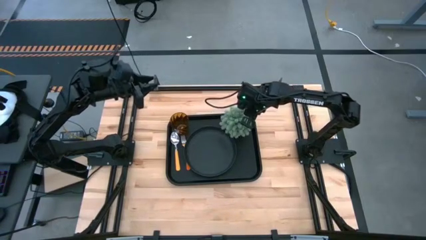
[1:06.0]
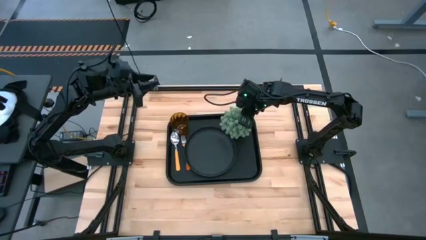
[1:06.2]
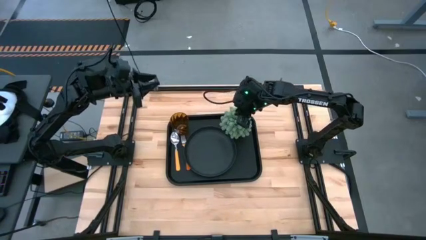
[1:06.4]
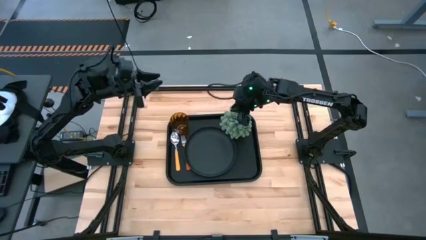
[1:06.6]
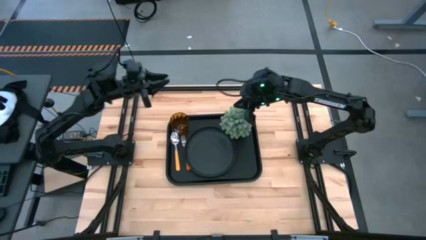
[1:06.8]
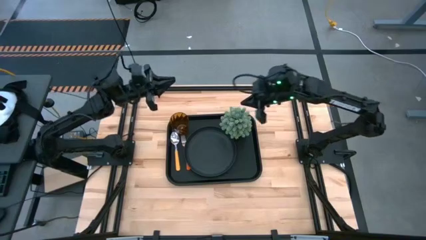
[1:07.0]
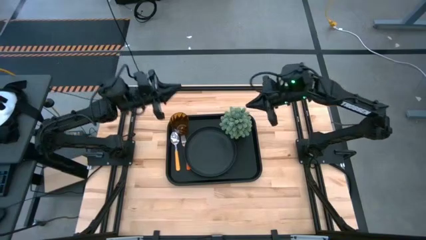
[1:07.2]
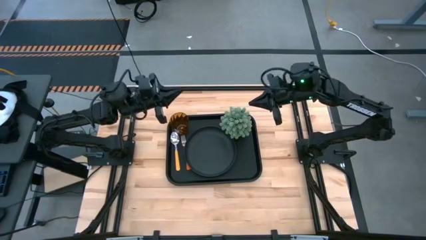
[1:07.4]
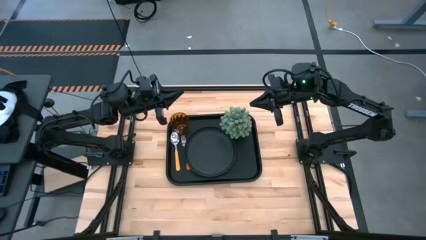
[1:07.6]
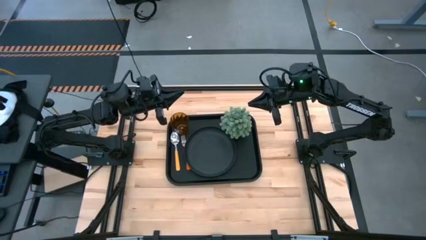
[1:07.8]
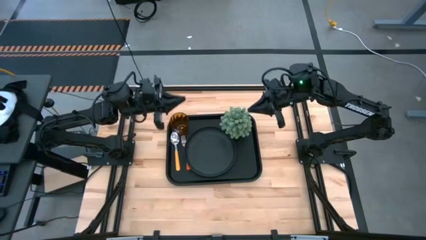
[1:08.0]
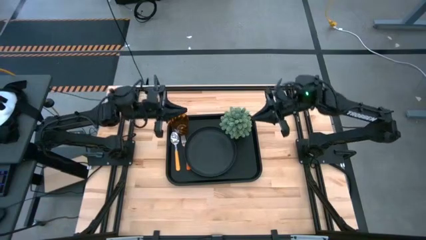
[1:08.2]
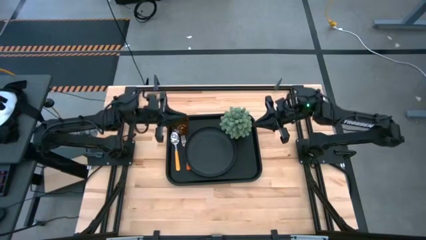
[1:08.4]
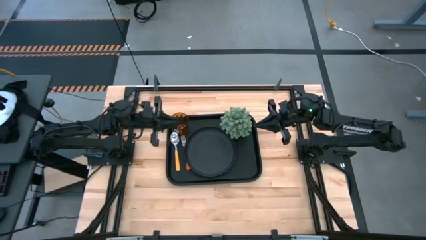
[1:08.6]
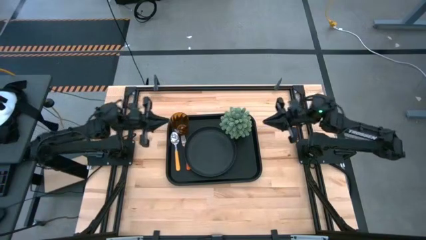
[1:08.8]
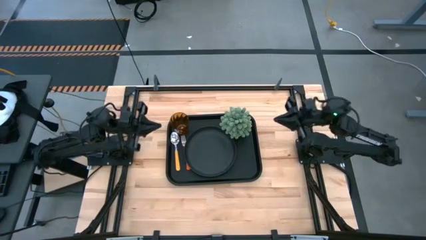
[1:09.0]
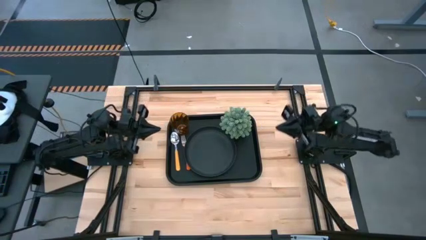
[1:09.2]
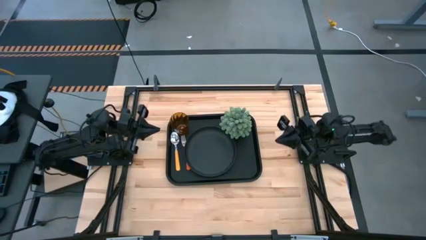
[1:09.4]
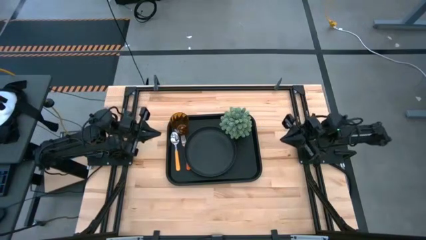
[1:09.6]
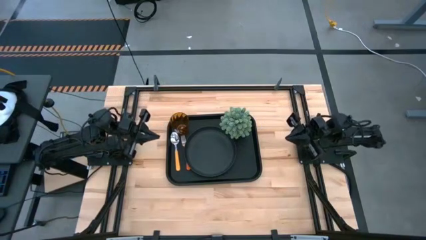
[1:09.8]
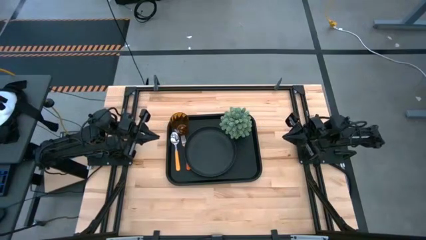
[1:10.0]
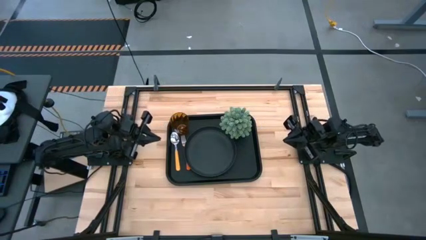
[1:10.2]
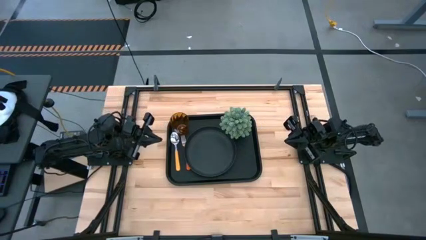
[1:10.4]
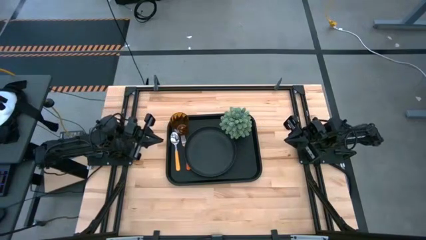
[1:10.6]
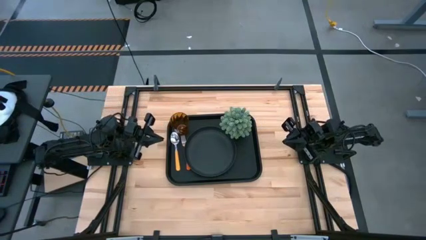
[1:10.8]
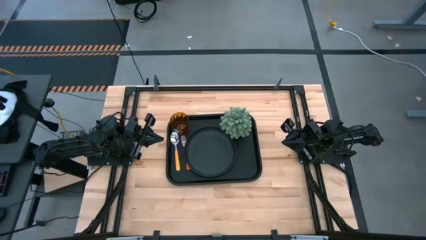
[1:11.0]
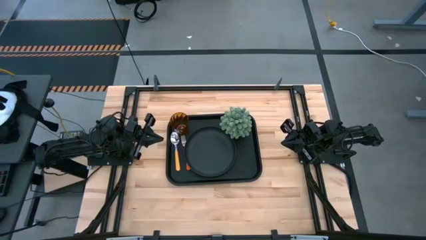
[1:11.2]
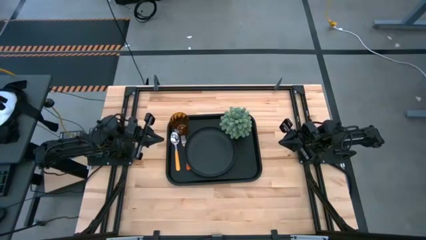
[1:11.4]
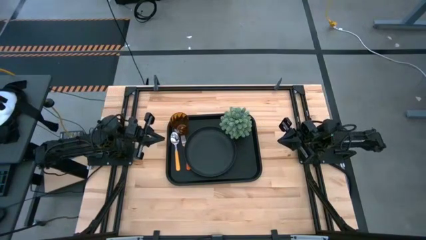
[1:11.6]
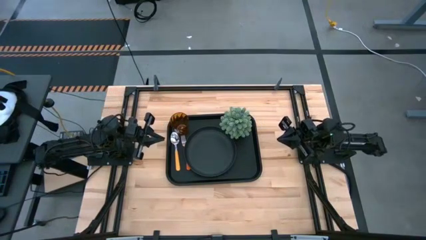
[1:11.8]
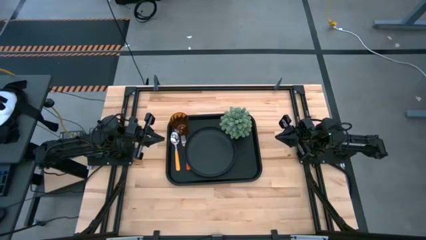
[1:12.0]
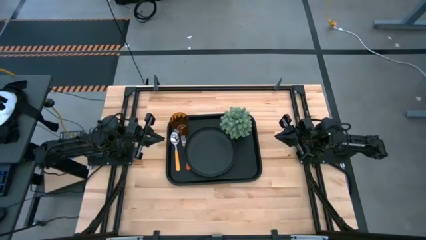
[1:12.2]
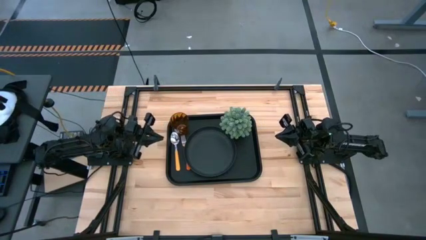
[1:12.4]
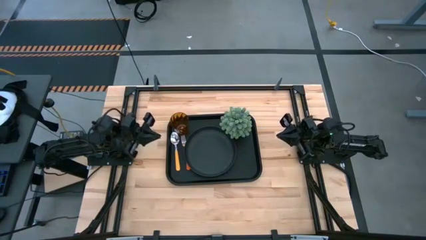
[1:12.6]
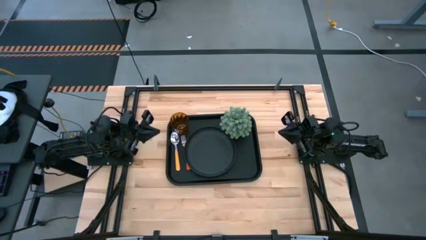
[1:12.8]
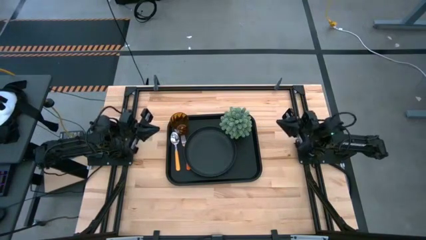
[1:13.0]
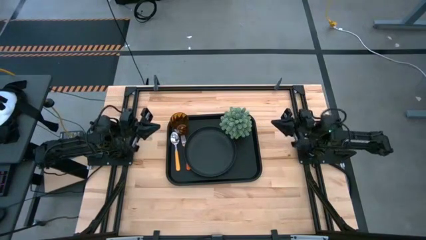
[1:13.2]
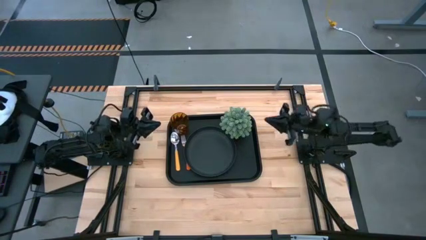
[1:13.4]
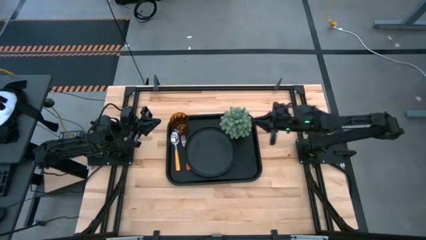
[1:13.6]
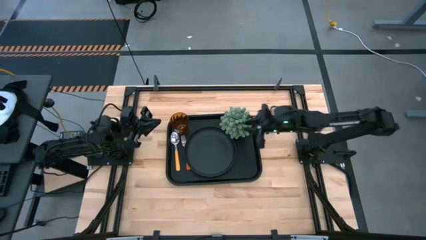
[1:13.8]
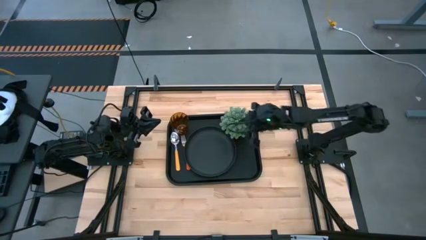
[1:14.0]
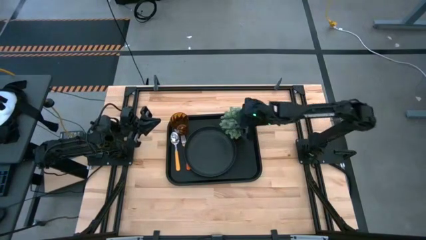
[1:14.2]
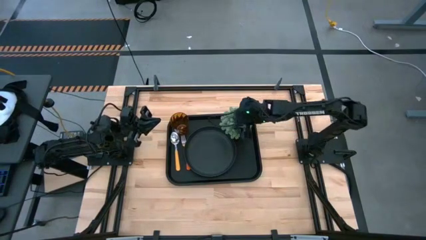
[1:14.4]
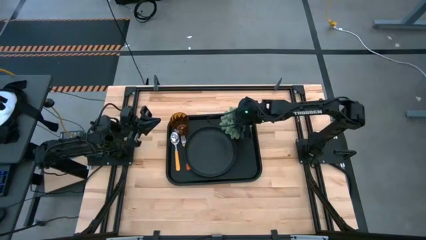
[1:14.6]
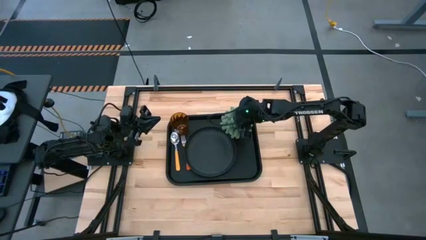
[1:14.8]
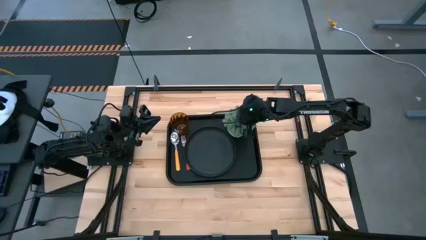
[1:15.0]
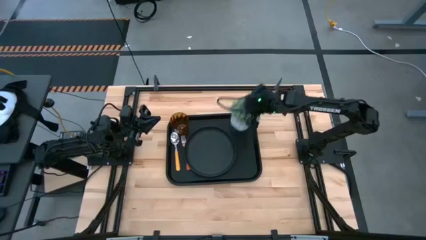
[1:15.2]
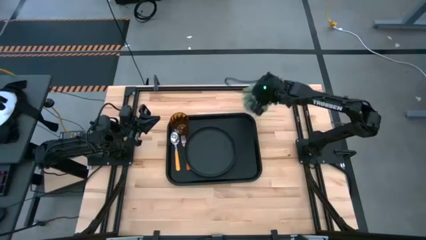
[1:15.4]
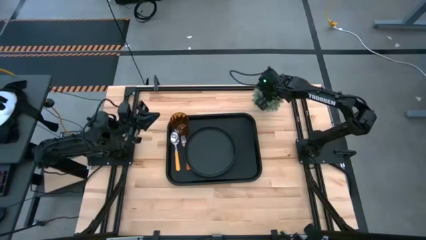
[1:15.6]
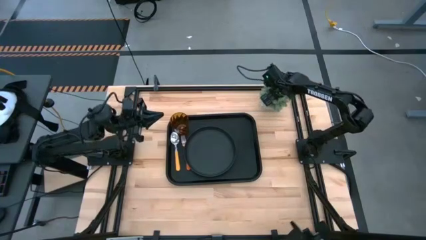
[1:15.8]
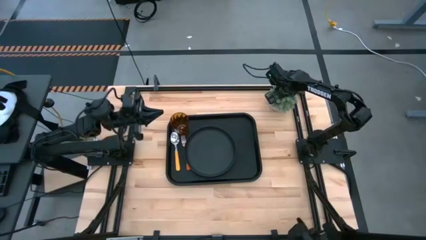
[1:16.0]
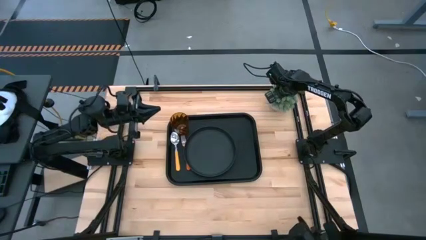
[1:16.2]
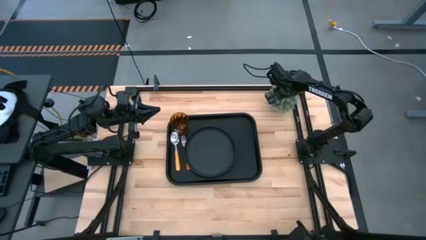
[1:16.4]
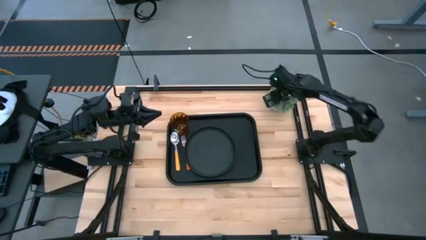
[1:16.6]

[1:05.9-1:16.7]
Task: Pick and place plate/cup/fork/spoon on tray
Remove the gray potted plant from the black serving tray

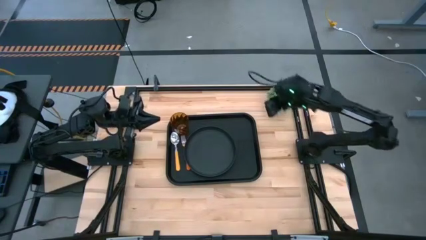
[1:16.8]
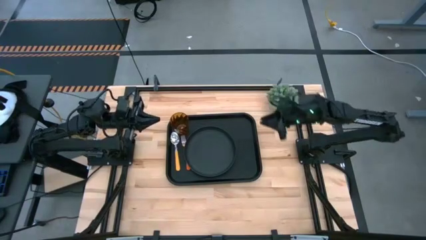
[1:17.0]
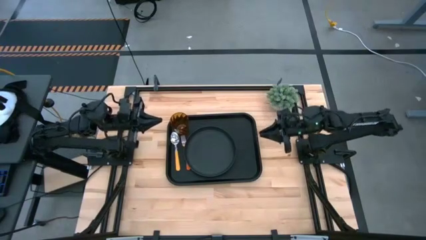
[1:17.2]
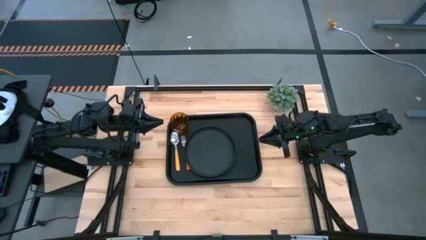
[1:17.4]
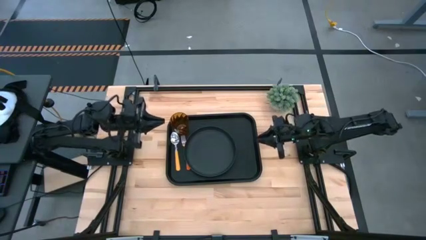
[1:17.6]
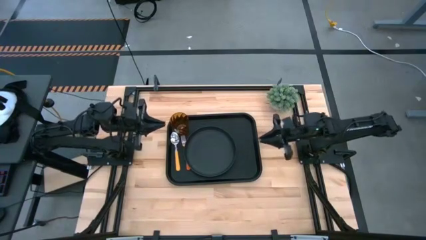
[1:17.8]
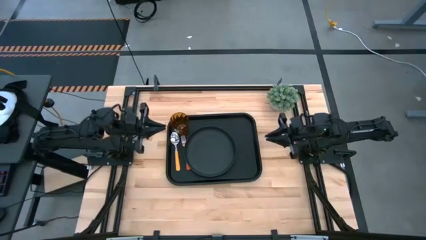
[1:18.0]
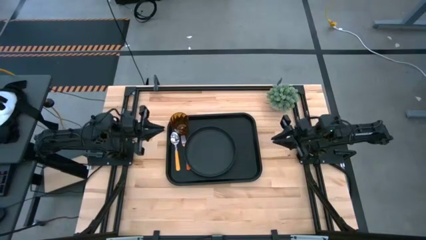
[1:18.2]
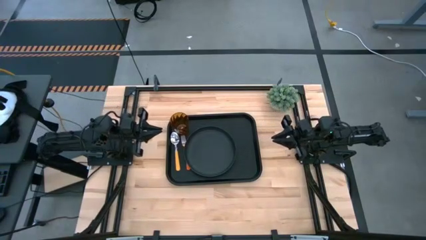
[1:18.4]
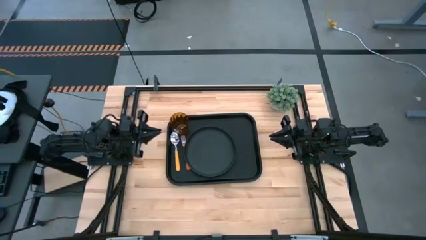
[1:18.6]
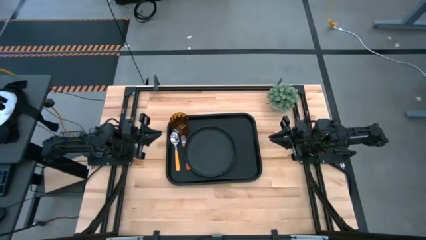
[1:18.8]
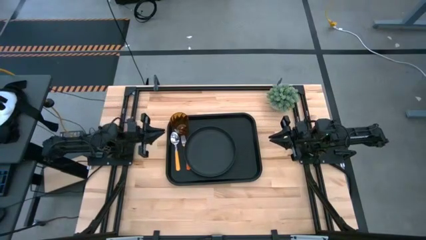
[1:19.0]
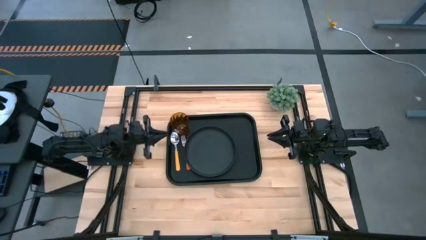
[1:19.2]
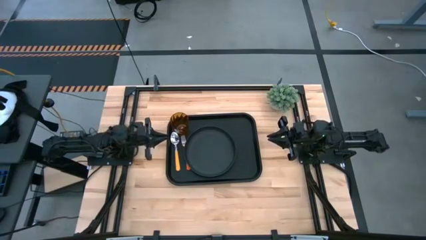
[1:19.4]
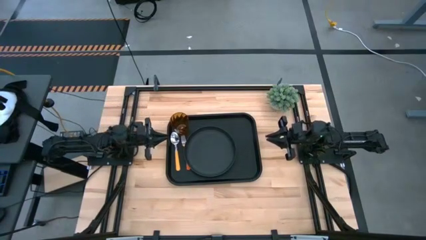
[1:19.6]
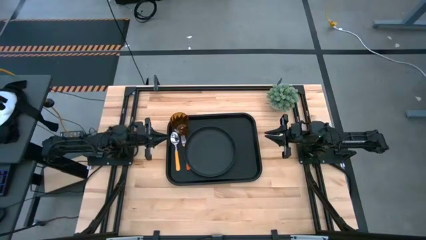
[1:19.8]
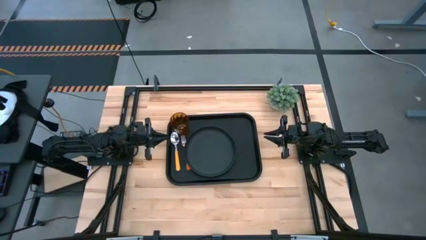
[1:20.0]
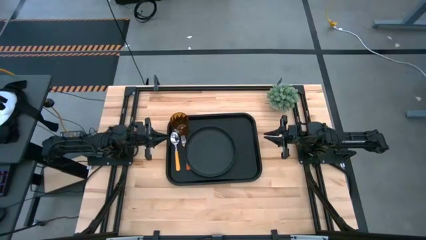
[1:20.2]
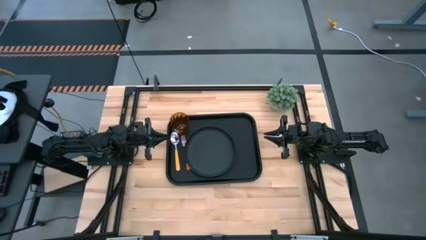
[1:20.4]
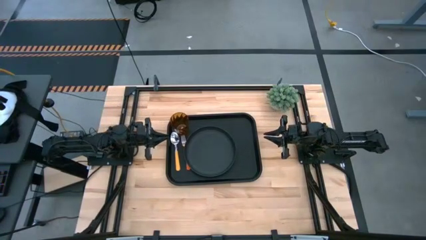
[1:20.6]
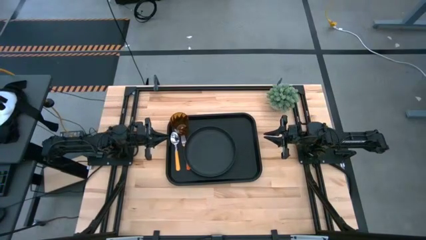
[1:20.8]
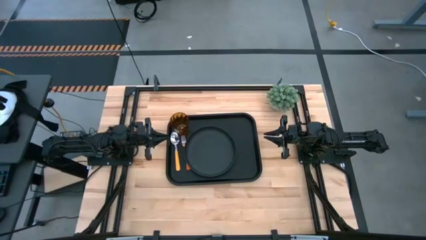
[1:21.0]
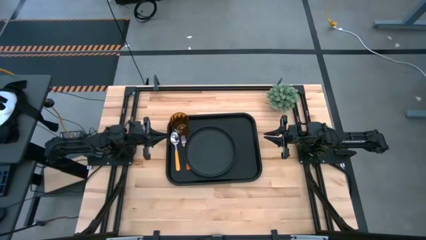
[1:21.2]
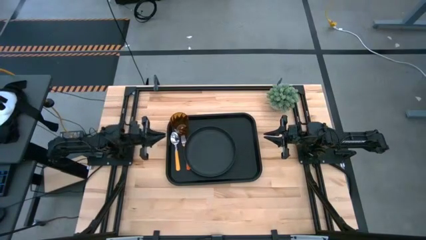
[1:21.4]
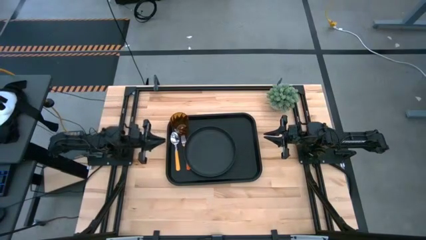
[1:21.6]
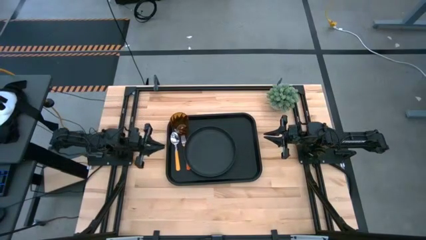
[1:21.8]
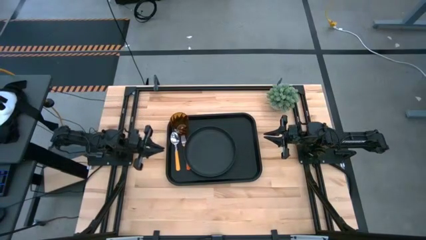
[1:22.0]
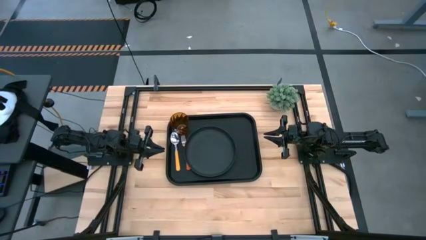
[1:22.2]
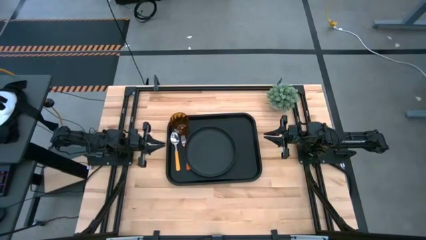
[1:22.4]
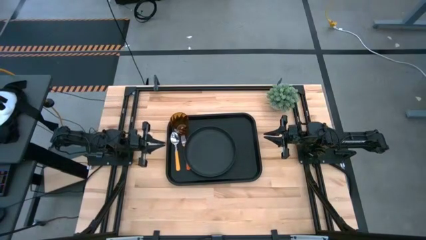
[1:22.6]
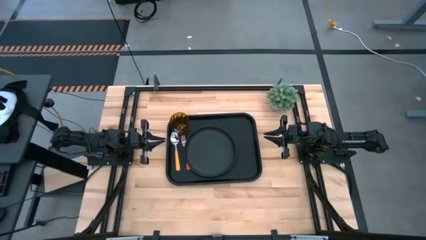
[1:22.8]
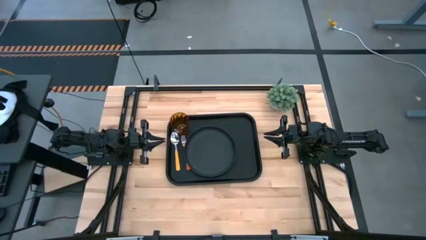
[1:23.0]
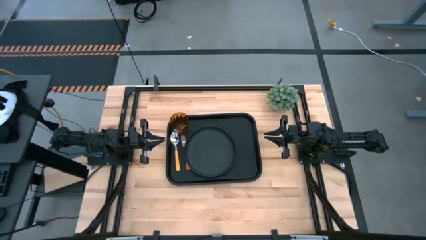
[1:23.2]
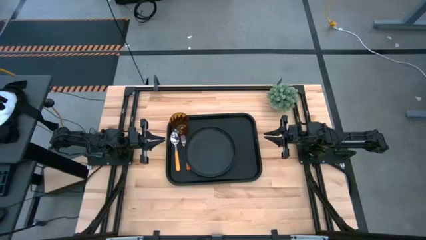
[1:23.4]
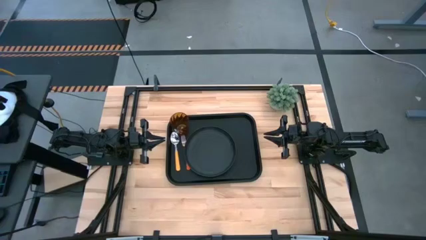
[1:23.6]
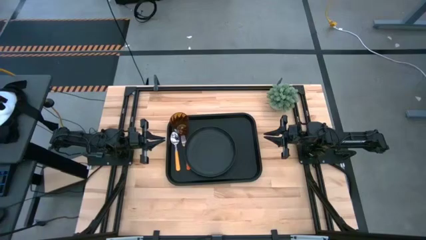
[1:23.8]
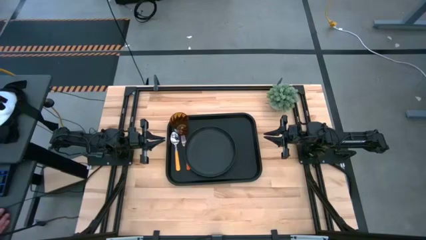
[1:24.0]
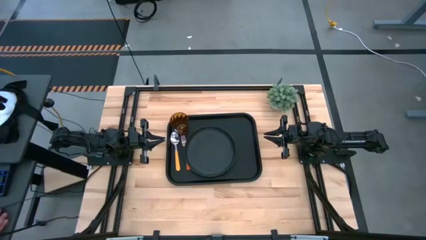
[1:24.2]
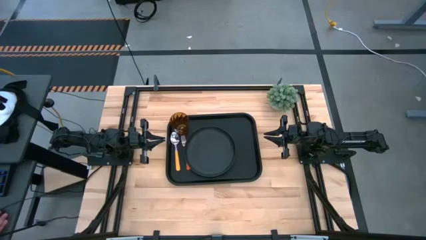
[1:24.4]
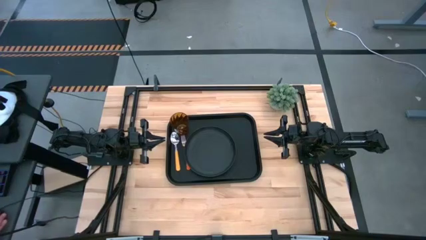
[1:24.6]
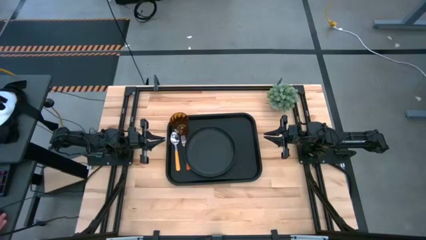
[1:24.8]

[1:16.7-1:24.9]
Return to Home Position
